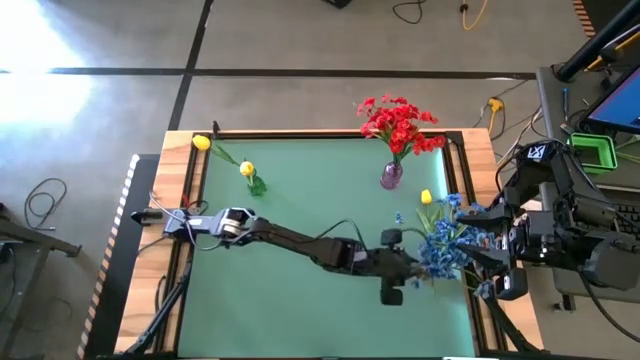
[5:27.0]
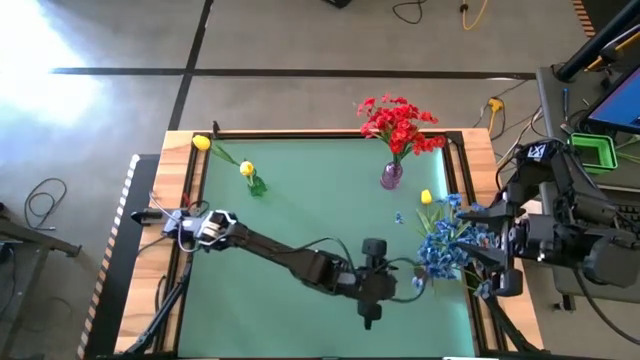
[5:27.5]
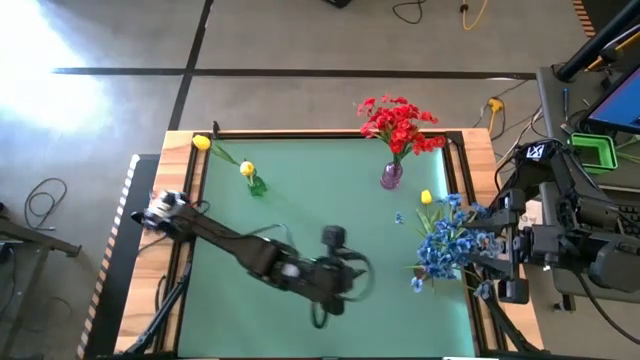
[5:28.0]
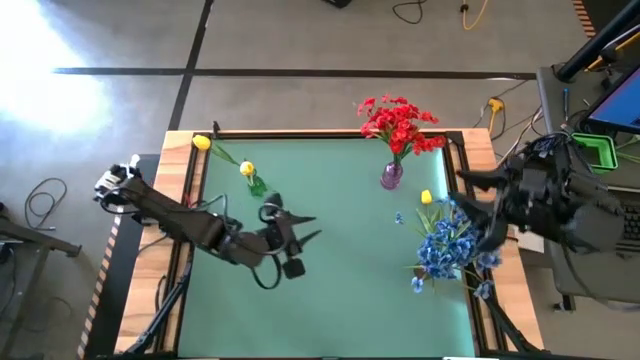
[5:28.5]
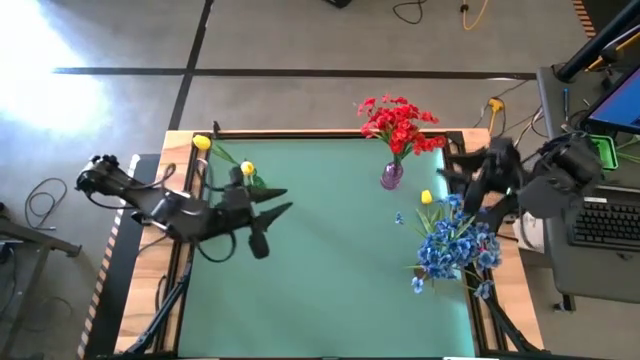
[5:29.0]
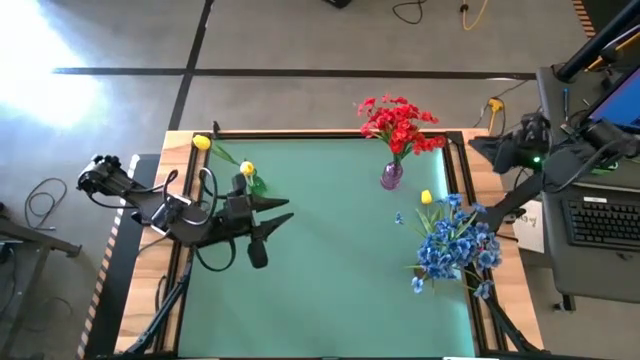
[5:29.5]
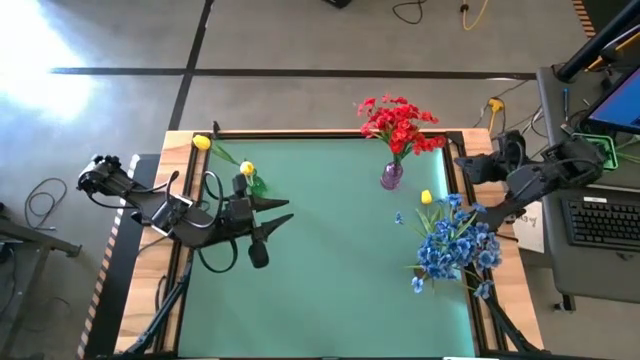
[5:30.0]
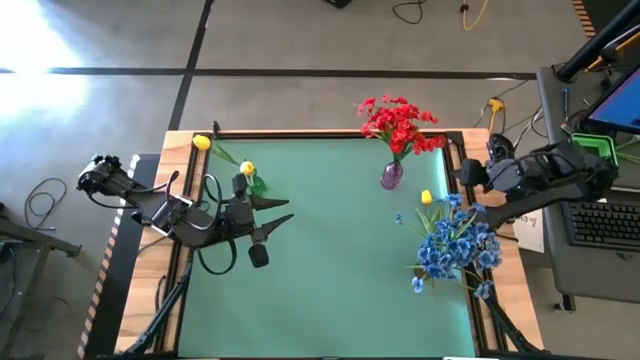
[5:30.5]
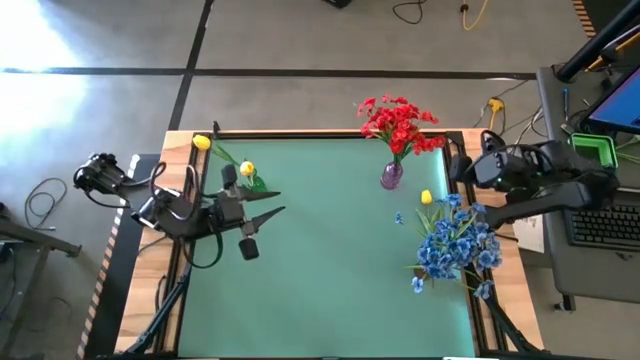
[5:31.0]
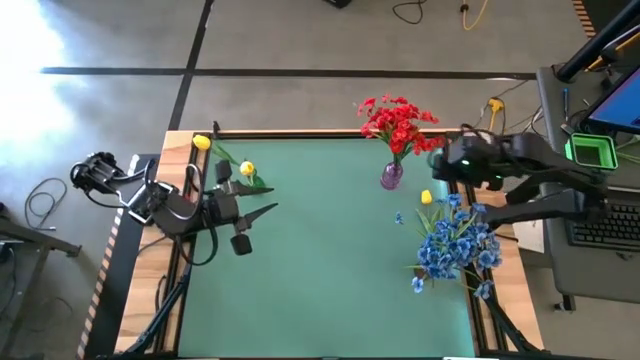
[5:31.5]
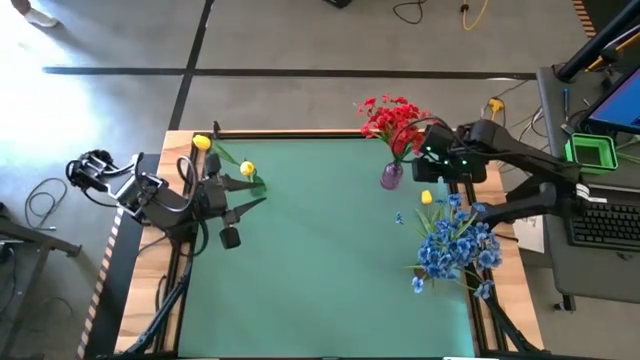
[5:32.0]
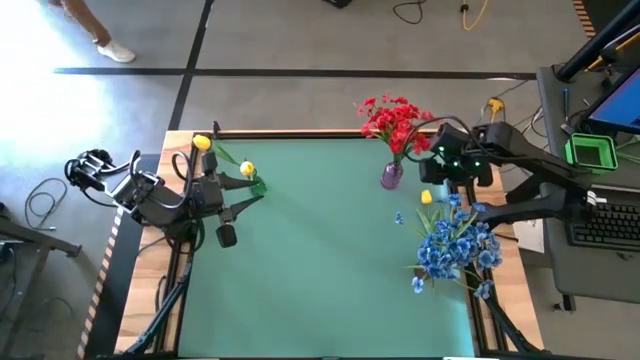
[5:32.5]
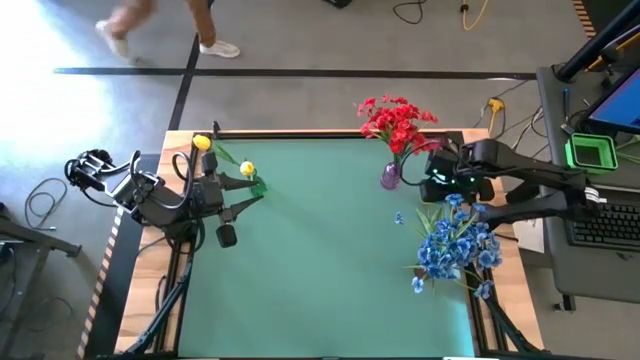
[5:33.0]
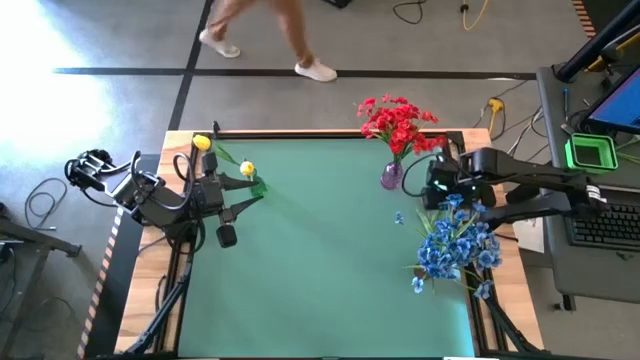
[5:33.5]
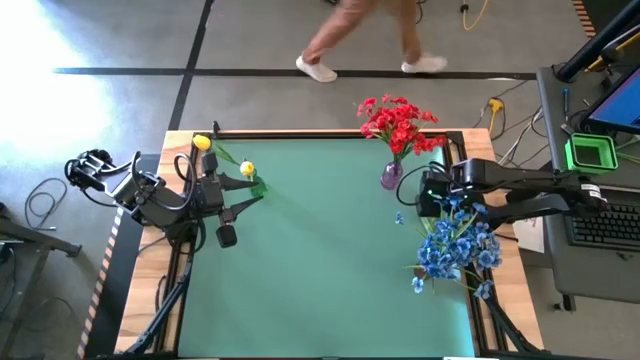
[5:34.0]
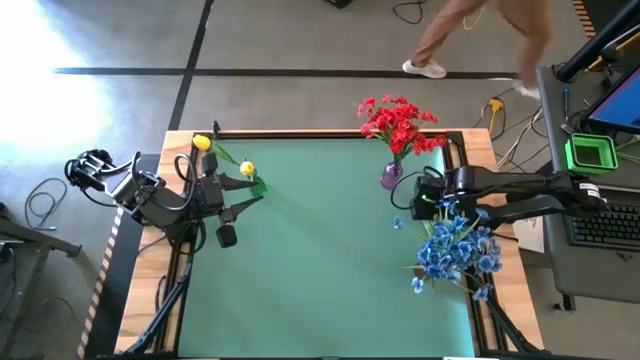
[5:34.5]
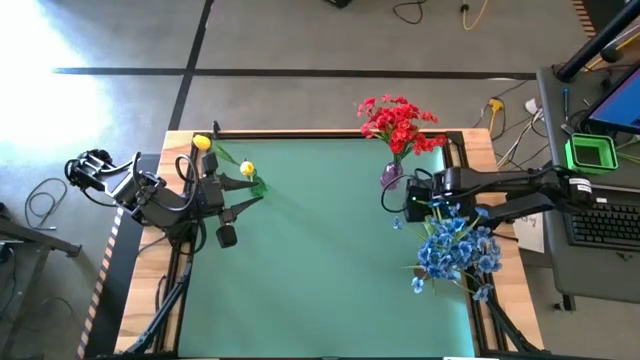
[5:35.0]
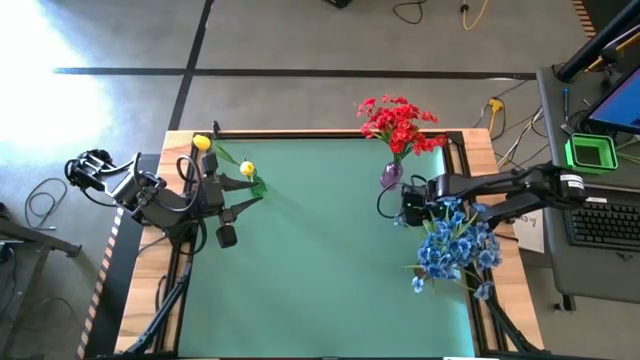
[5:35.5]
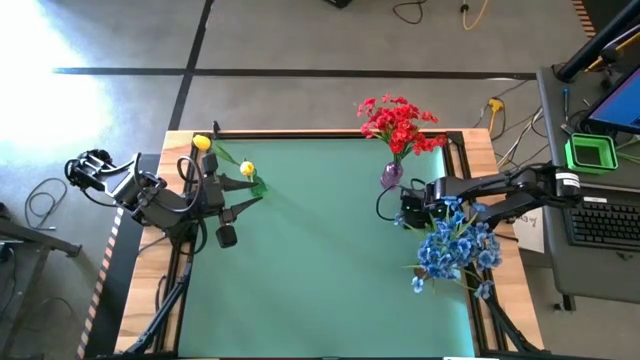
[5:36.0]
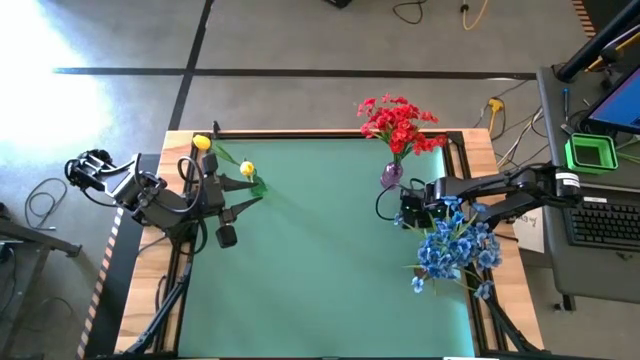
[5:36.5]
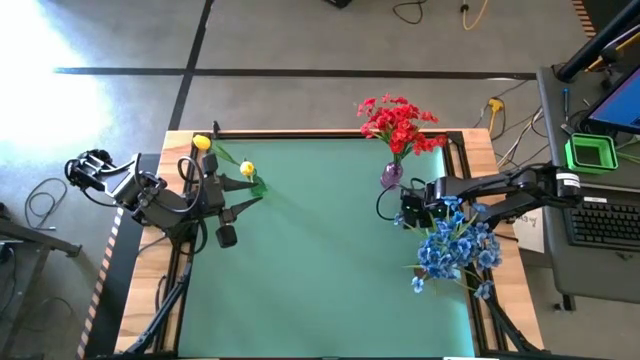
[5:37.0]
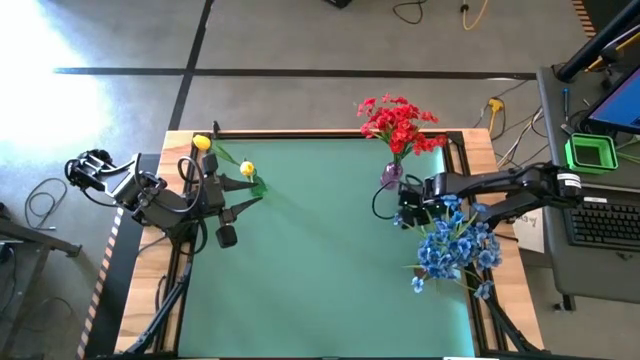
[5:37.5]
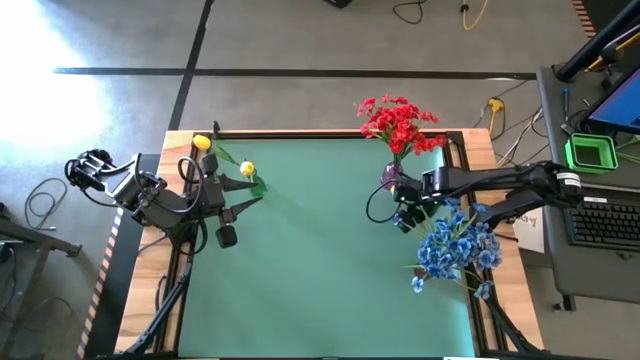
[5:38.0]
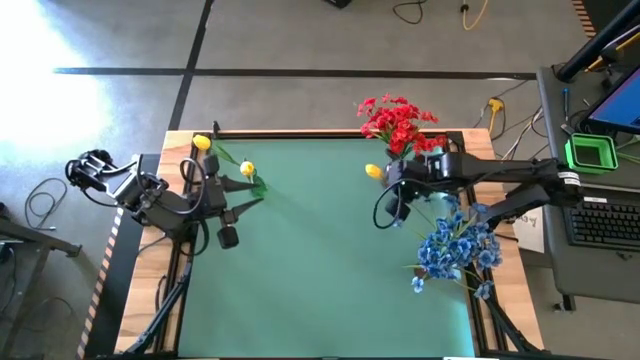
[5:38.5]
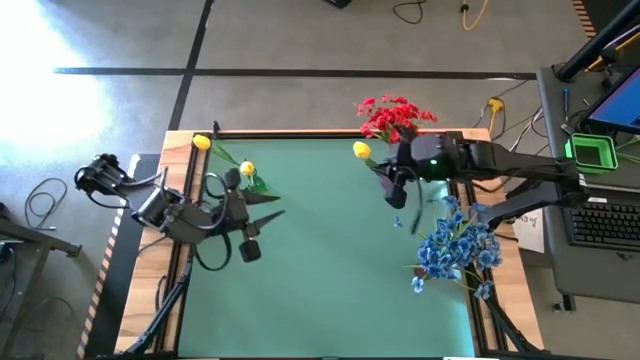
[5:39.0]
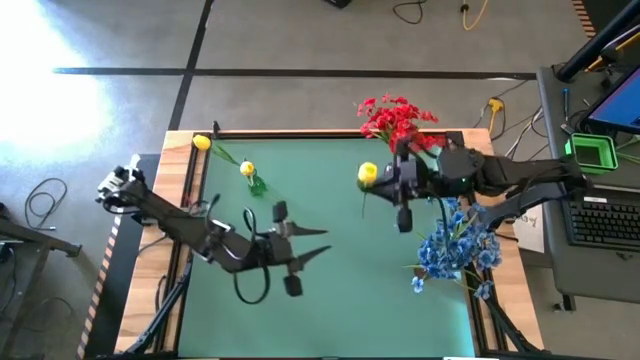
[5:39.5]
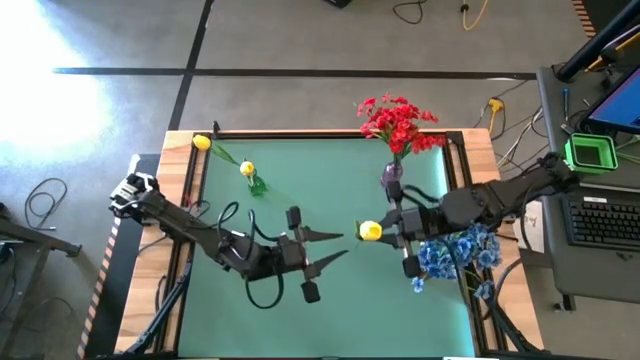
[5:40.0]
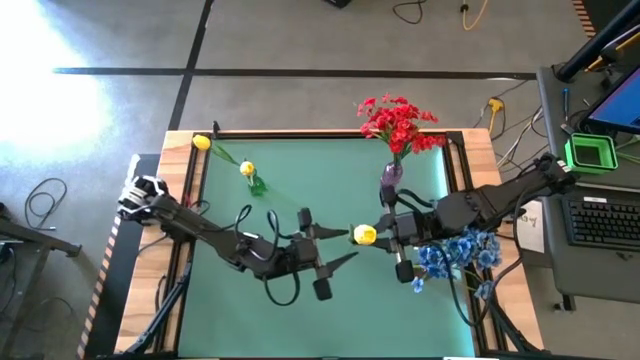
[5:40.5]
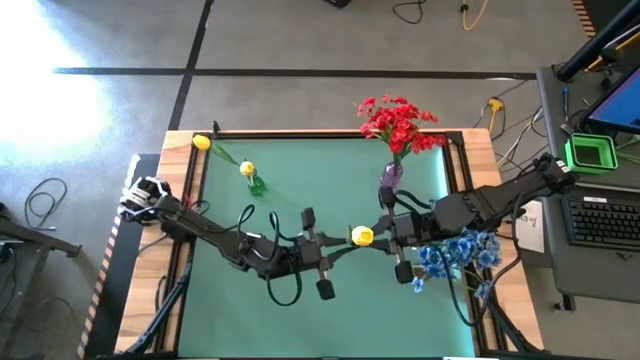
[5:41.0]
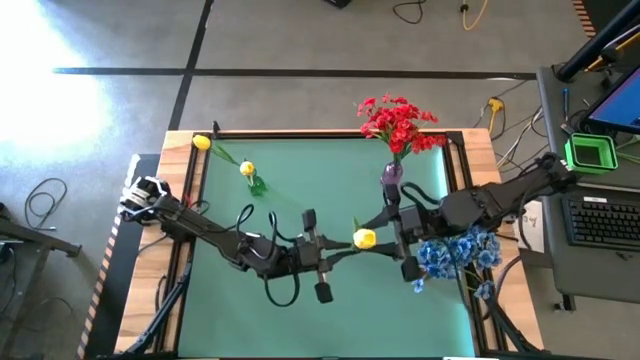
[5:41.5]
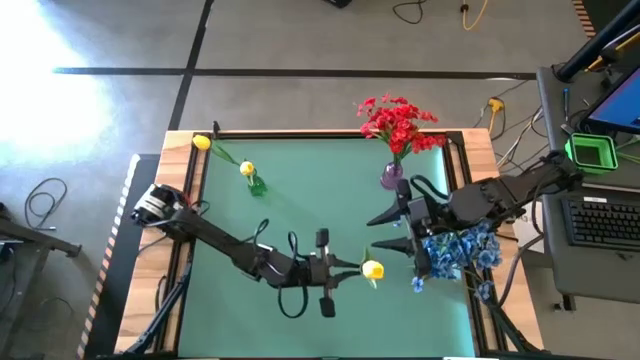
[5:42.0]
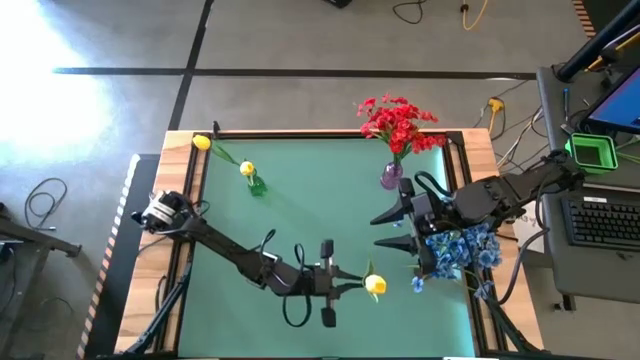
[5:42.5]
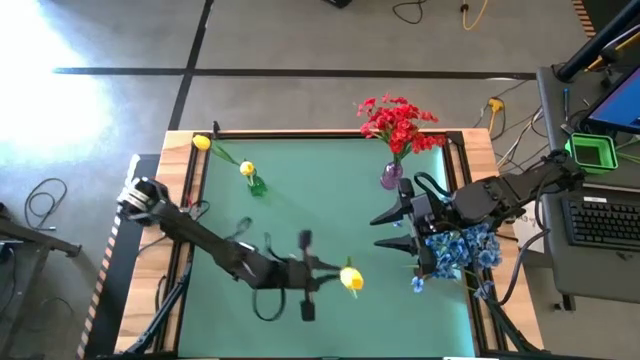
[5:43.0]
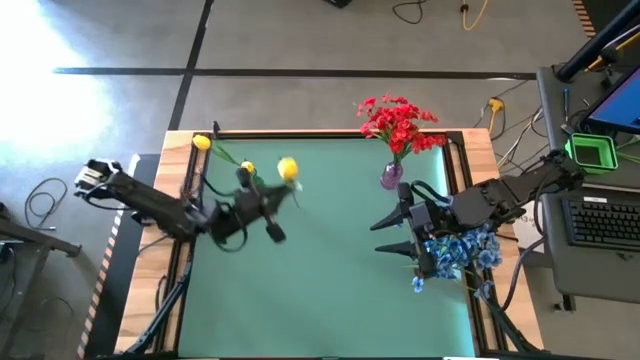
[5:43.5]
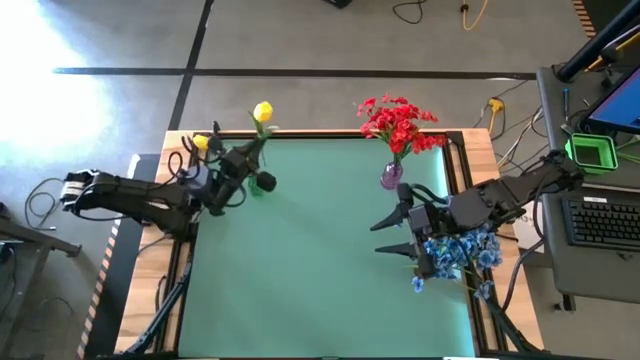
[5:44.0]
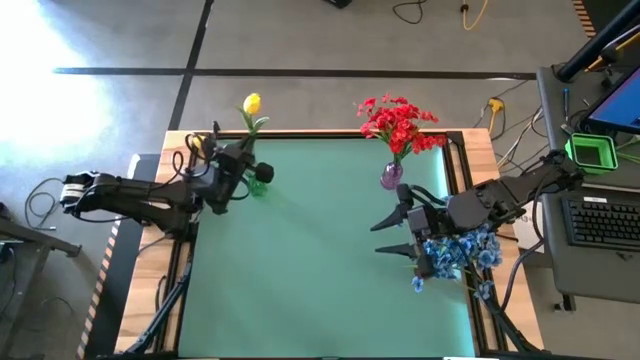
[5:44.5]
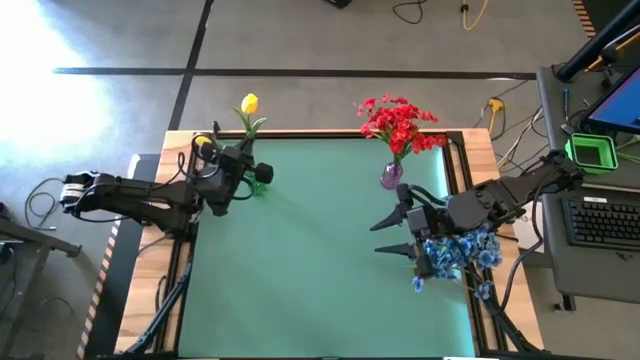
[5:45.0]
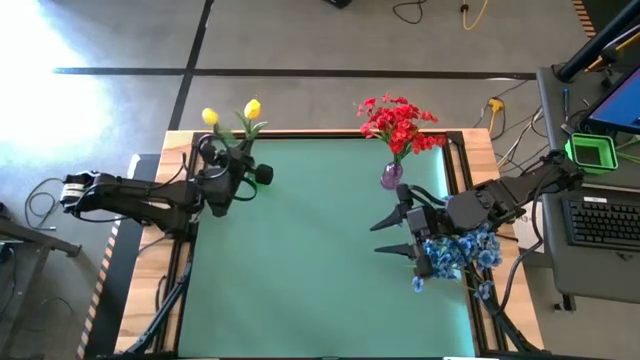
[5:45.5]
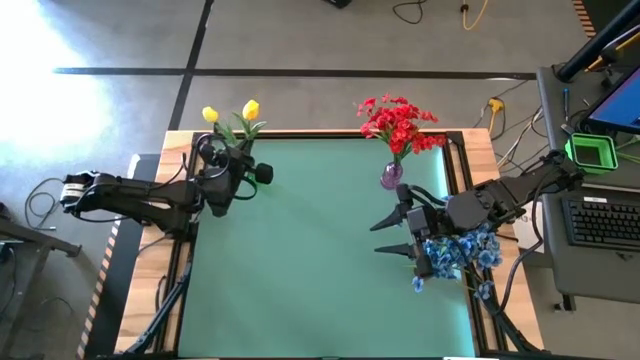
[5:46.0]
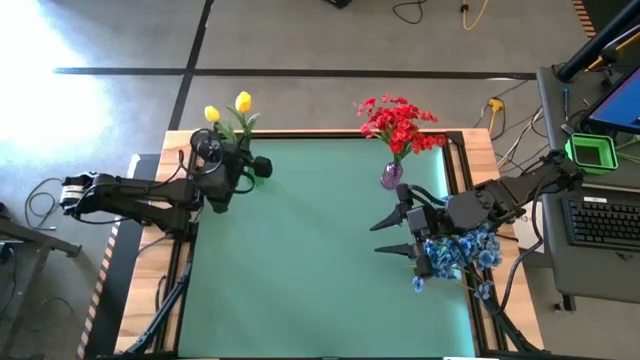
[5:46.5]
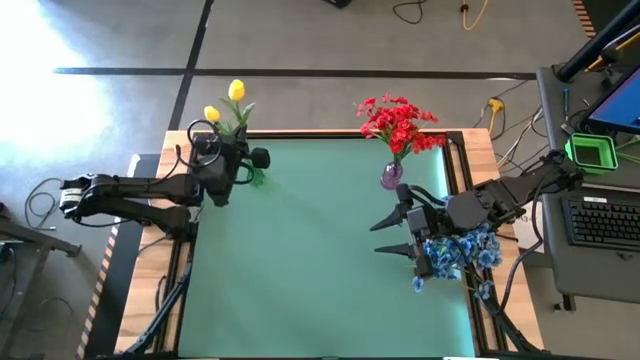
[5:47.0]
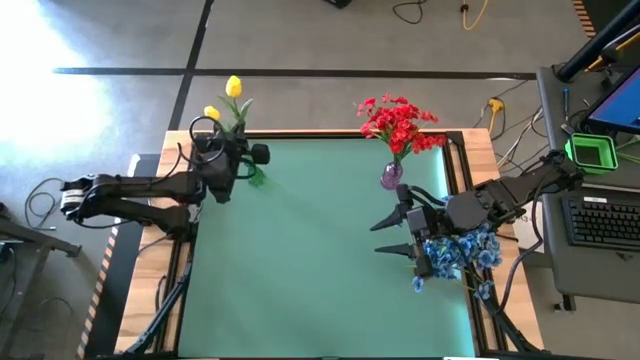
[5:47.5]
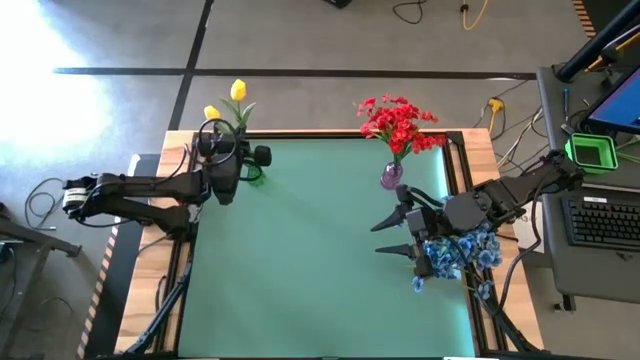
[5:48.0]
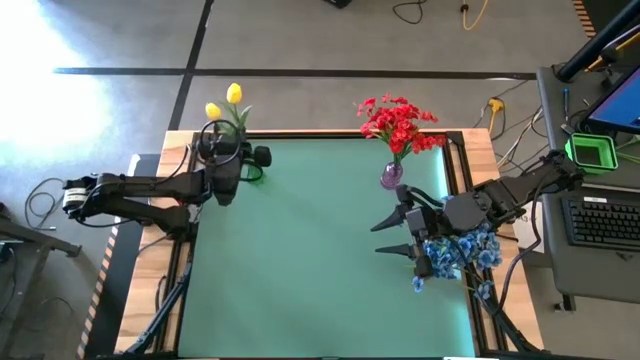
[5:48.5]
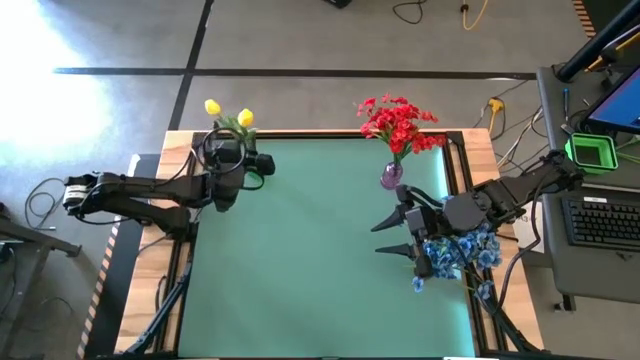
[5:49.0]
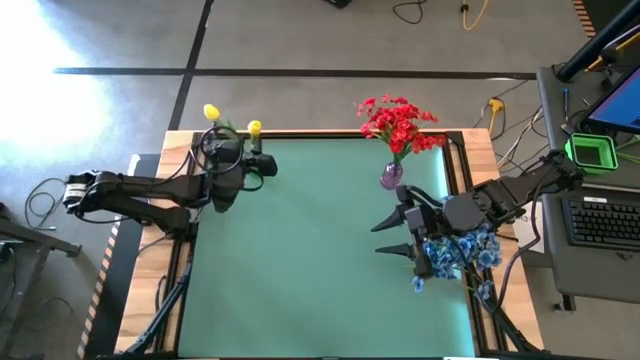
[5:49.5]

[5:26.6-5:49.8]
Task: Sort flowers into vase by color
Put the yellow tulip into the green vase
